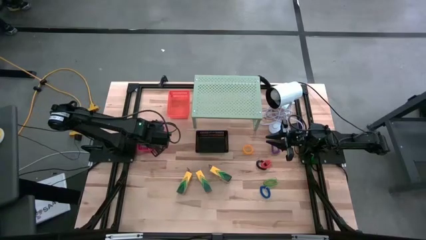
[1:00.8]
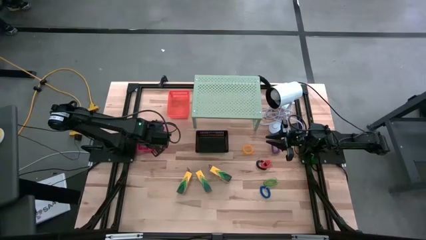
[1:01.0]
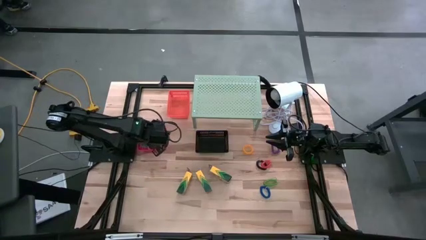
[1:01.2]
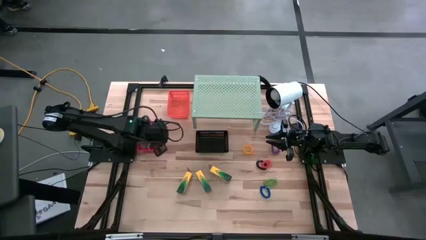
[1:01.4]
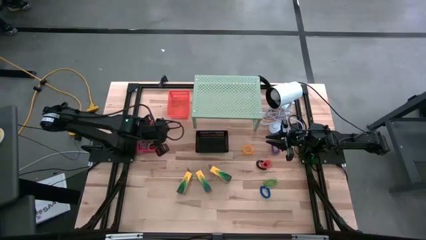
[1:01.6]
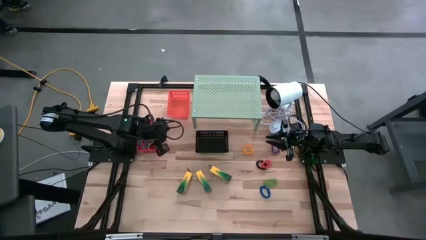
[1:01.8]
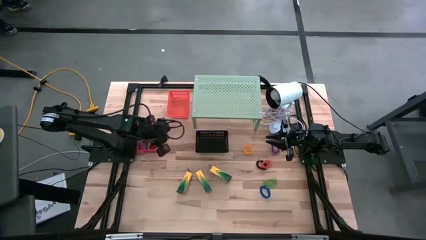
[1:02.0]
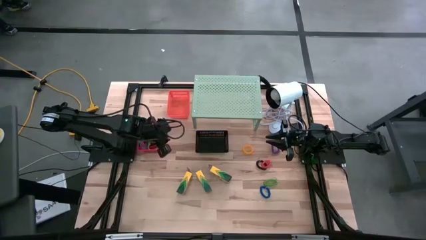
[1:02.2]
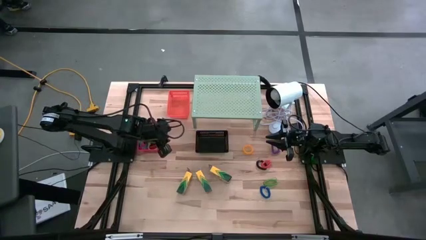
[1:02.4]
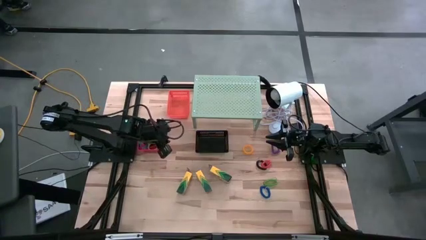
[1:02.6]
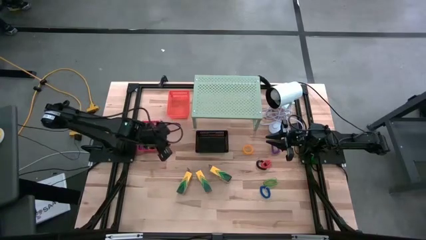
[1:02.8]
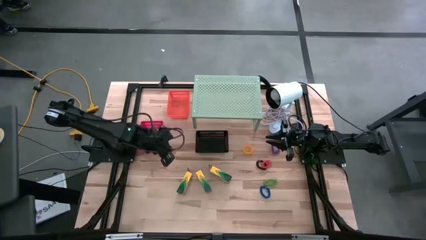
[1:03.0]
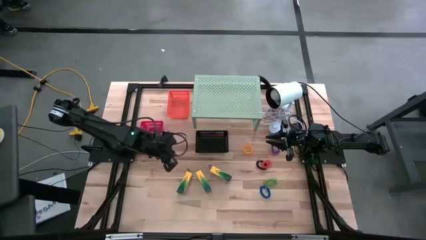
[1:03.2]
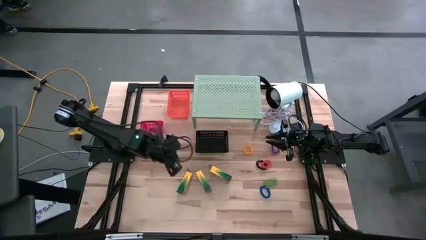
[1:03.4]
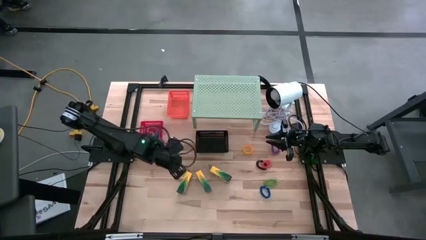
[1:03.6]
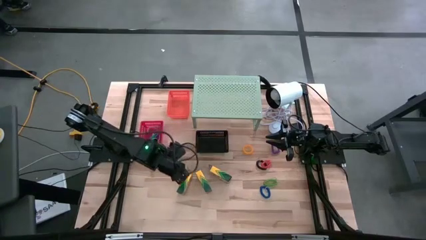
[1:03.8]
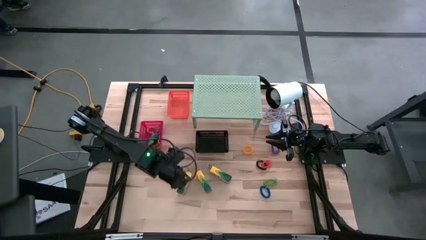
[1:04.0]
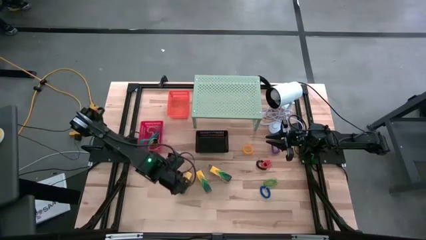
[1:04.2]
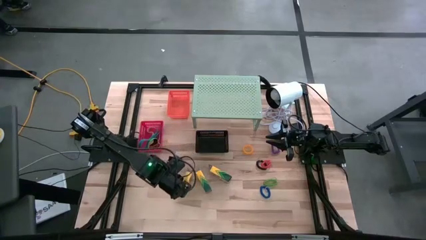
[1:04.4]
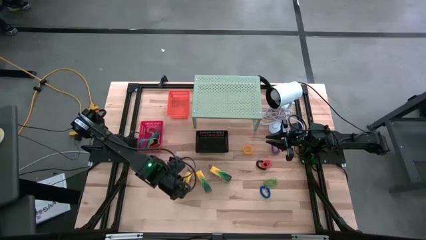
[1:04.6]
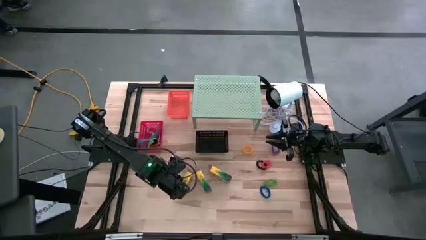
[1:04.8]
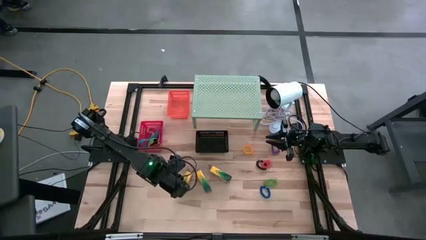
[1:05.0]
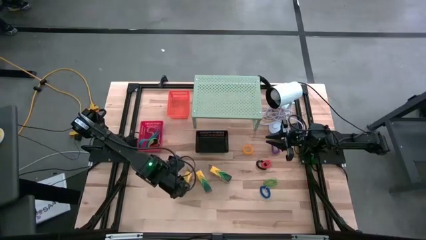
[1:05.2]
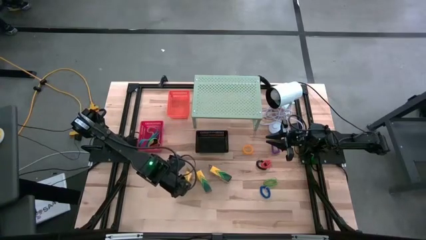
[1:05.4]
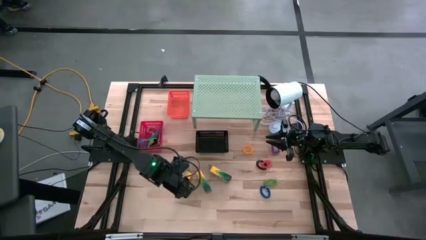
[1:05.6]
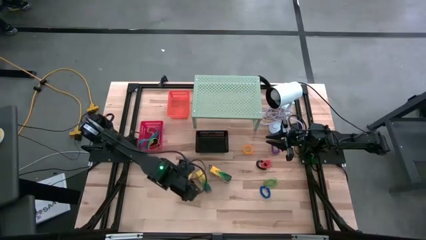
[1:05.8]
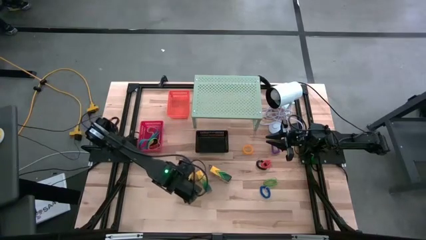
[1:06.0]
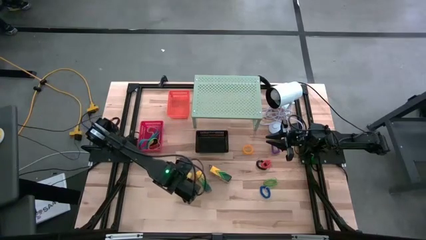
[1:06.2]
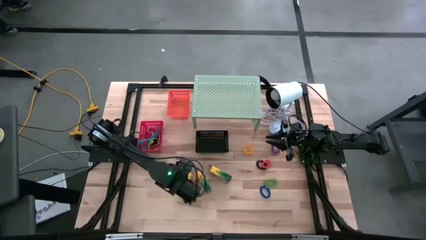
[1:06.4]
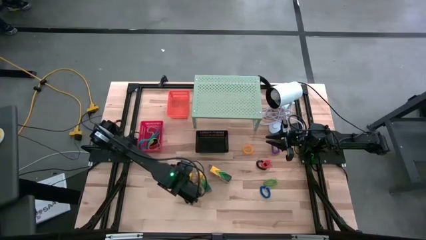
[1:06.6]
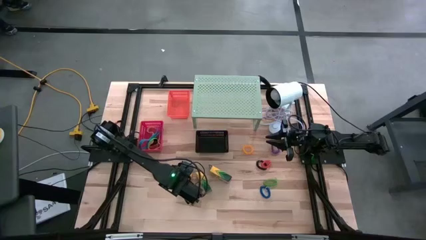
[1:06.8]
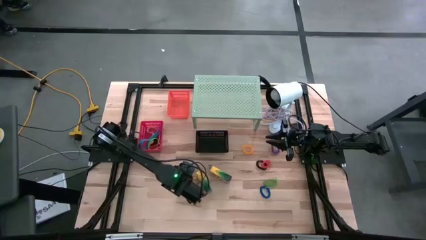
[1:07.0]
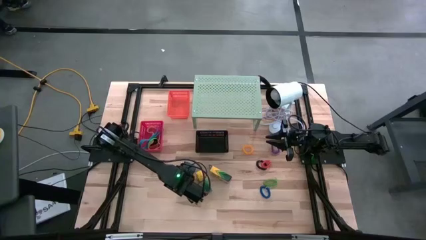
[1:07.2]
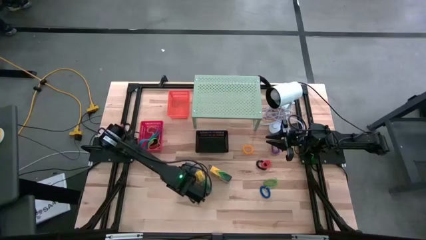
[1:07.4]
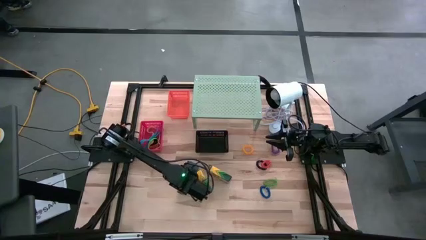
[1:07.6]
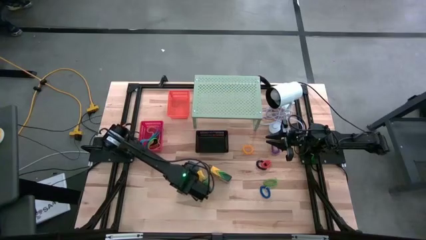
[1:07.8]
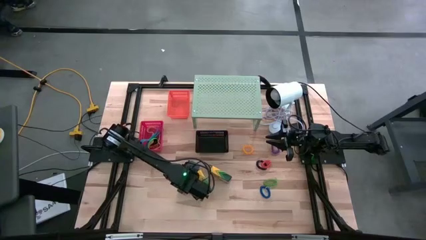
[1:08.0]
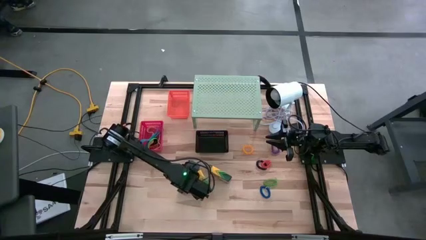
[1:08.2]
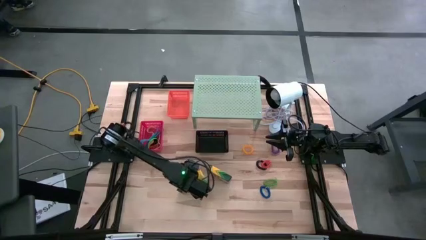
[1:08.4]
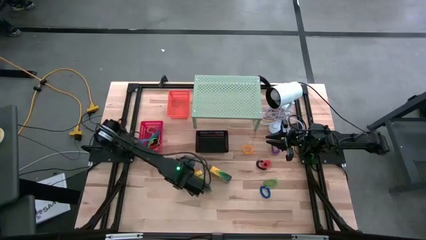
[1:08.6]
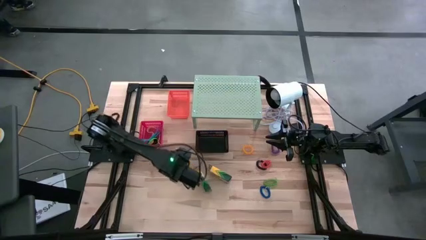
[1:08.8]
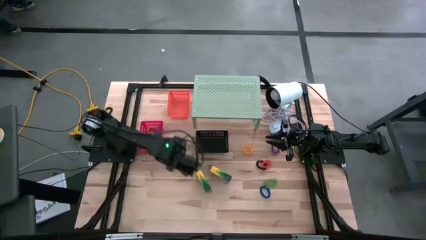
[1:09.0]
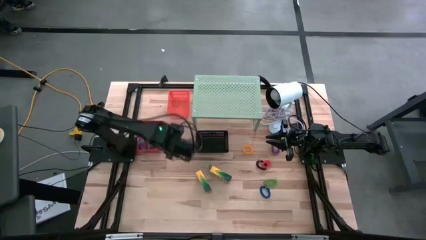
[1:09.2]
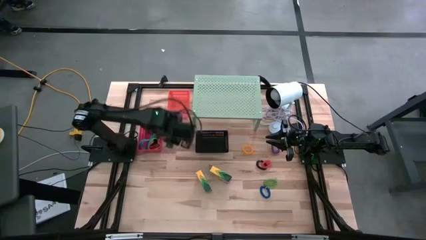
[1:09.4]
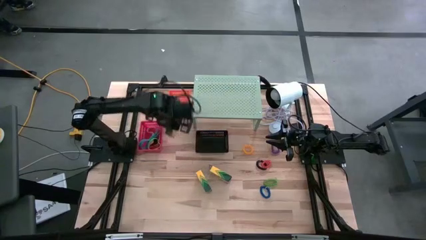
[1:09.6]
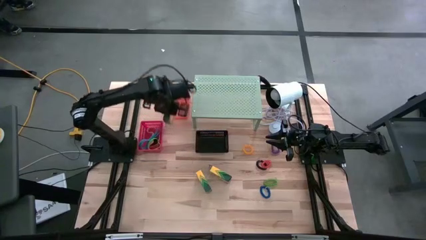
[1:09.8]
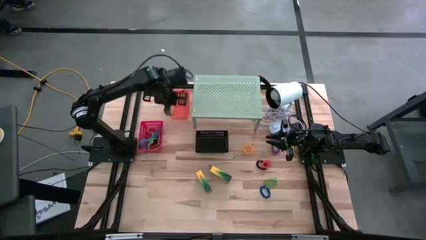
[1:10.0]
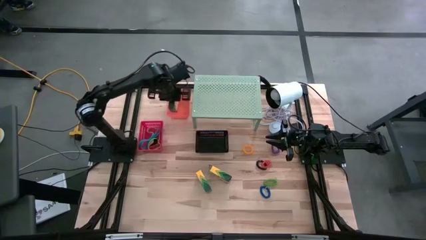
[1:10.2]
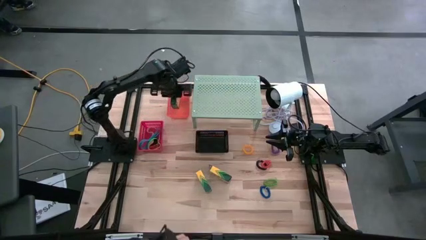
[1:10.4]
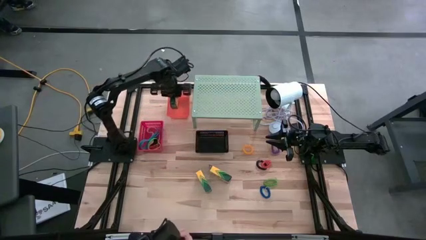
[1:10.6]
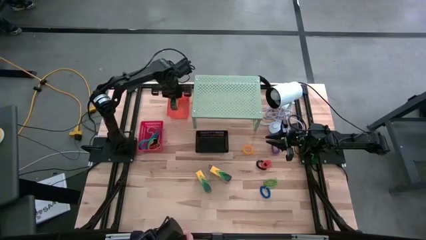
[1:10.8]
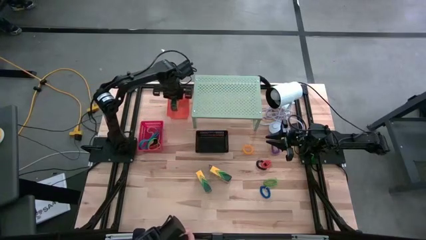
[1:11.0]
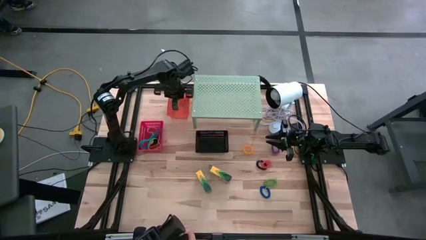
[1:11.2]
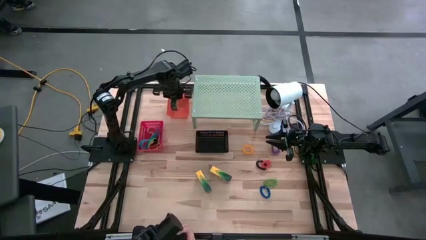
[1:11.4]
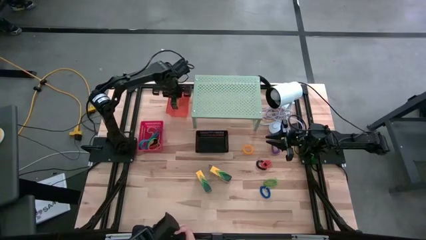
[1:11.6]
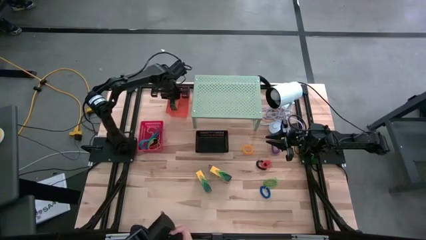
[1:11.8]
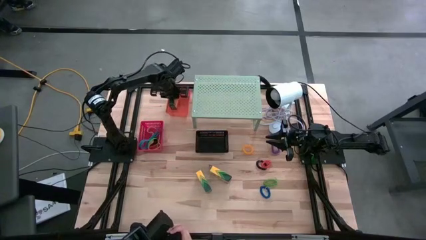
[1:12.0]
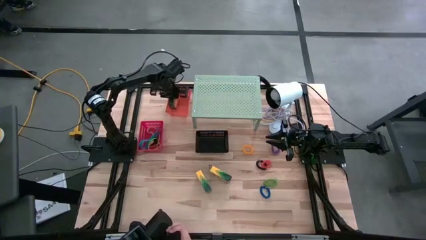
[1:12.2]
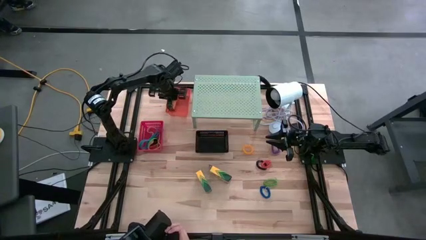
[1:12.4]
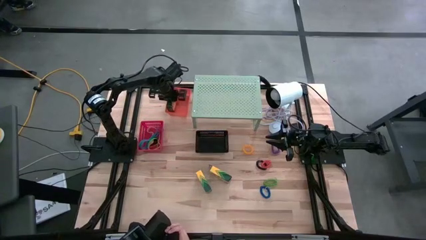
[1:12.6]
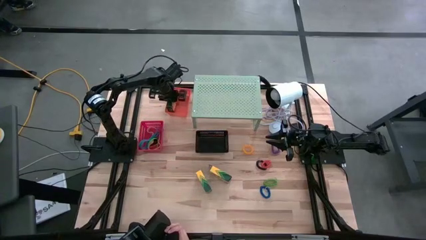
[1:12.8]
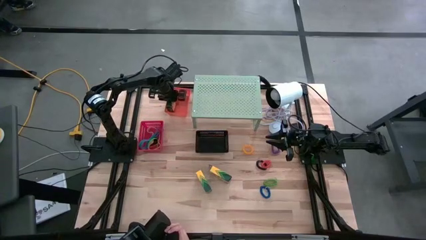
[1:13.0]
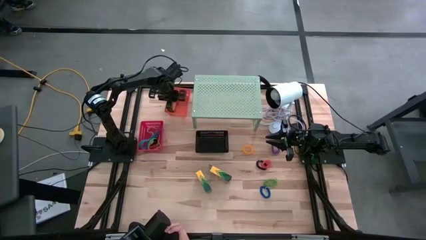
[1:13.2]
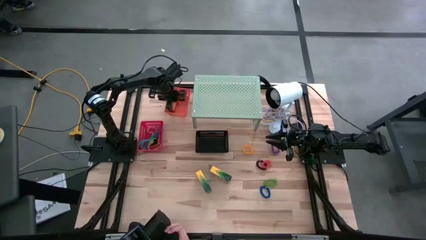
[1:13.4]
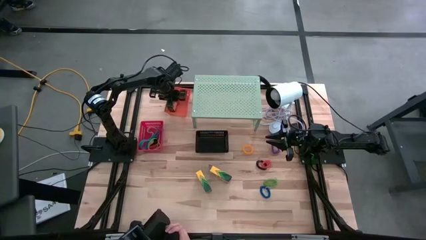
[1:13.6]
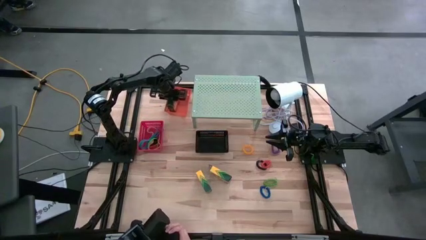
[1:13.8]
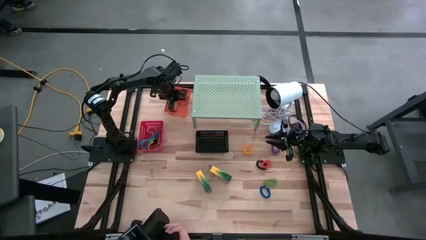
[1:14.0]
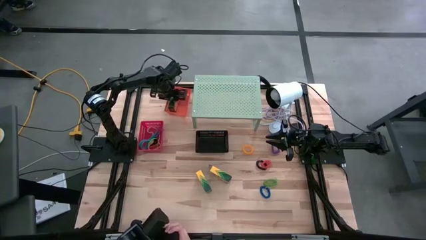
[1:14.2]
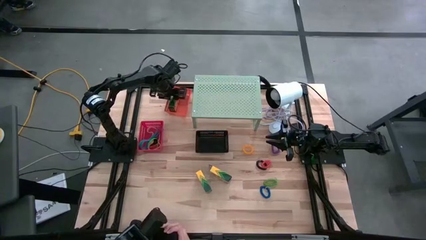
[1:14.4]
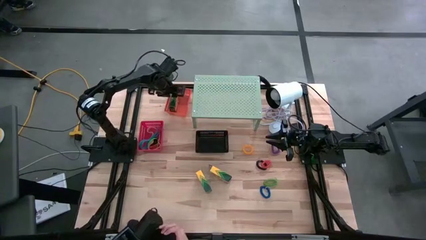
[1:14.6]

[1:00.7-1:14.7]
Task: Pick & Place Office Desk Supplies
Put the left crayon box into the orange bin on the shelf

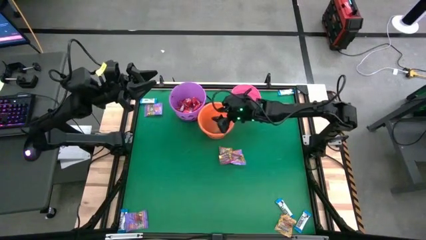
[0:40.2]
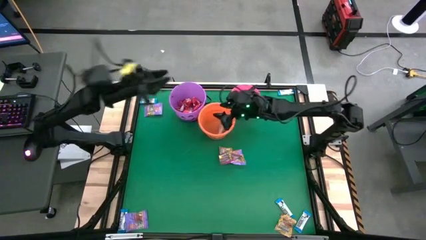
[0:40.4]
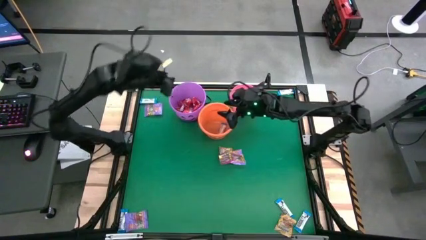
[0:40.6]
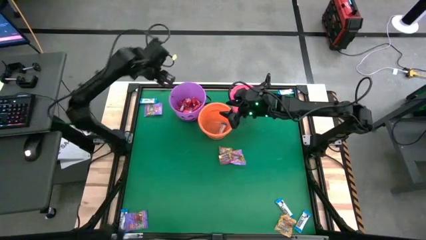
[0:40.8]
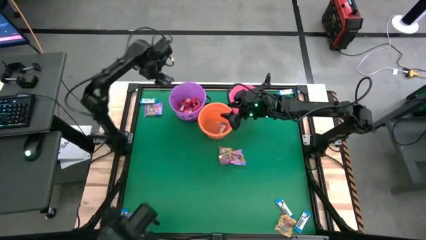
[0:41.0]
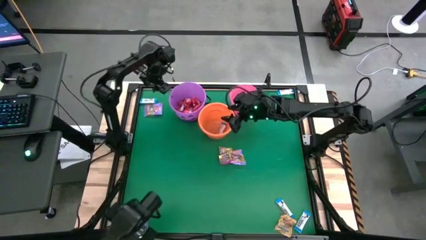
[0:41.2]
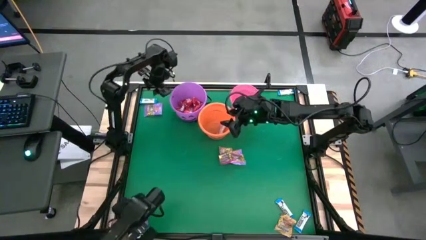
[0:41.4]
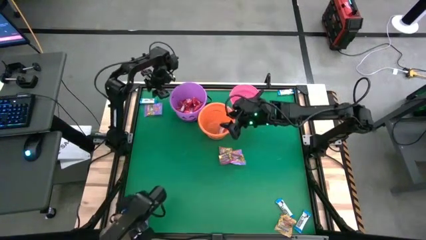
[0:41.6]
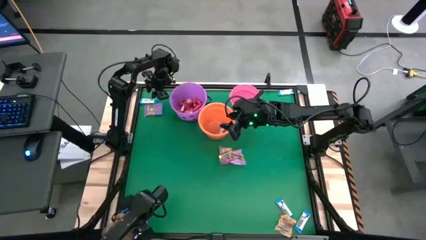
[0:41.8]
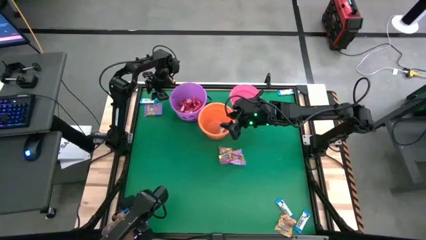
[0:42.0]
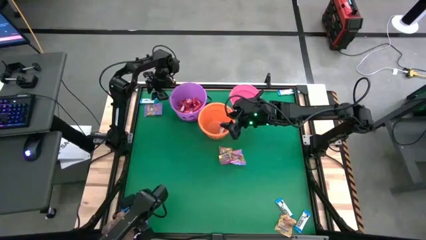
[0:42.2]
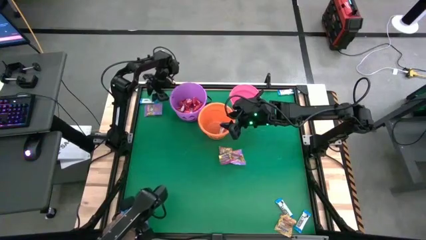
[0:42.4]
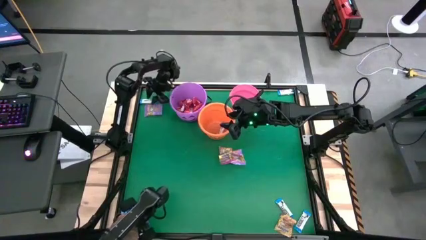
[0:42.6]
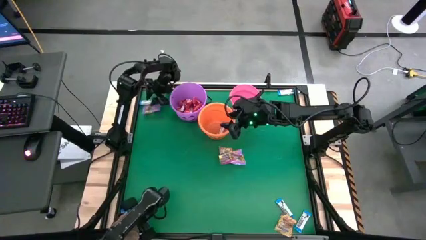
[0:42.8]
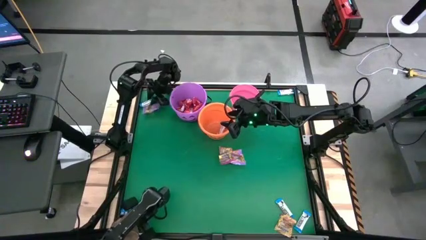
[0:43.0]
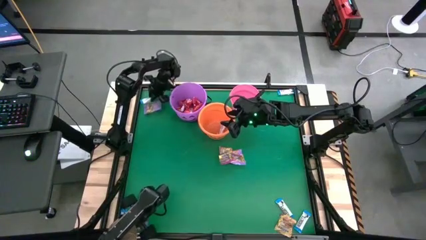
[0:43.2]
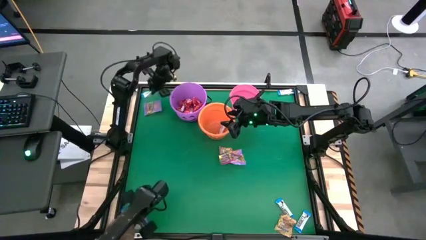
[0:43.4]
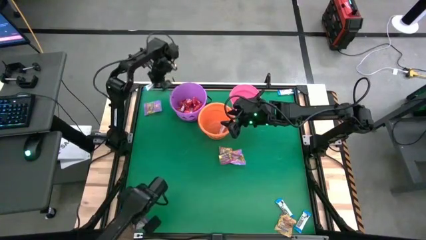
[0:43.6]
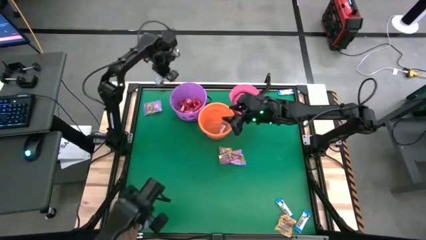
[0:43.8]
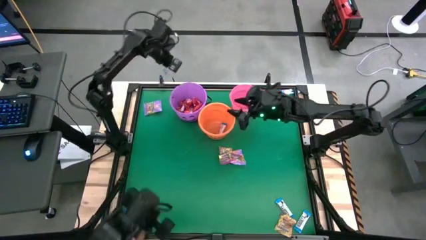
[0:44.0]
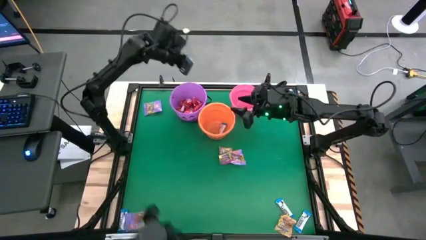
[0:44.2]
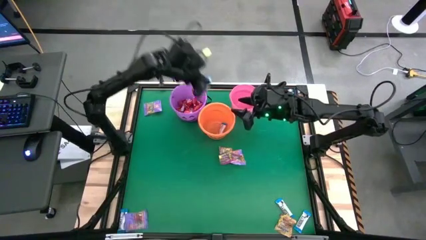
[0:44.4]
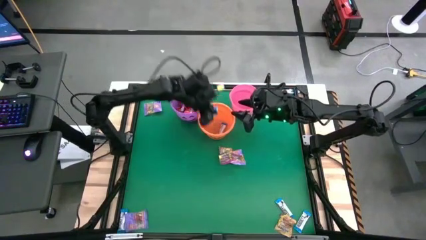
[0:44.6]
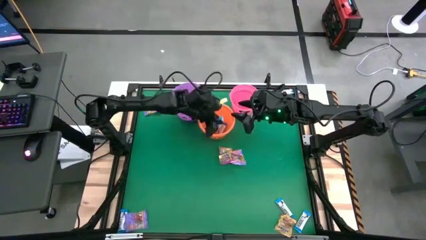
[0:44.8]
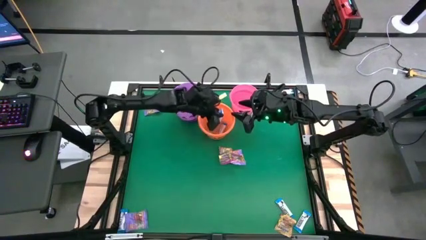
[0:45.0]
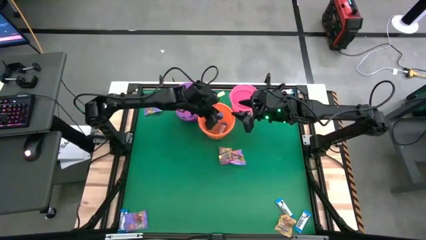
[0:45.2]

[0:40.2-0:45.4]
Task: Sort candy by brand, put in halloween buckets
Put the white chocolate into the orange bucket
